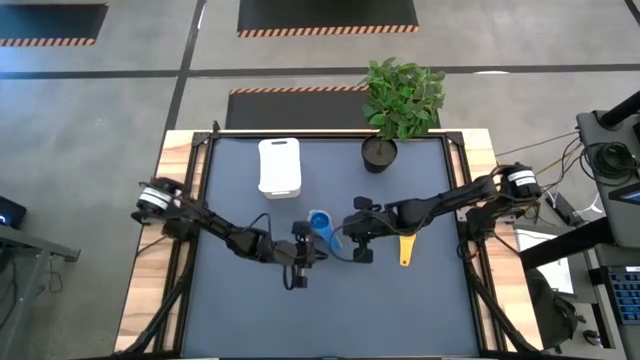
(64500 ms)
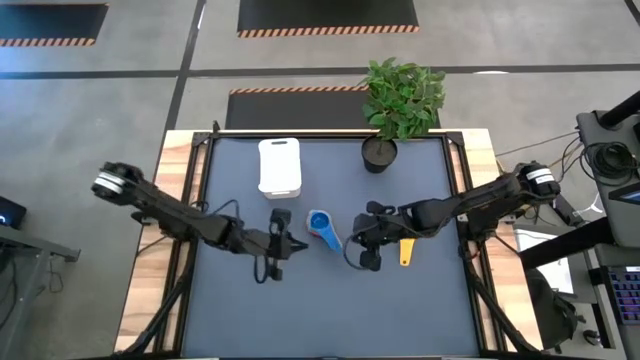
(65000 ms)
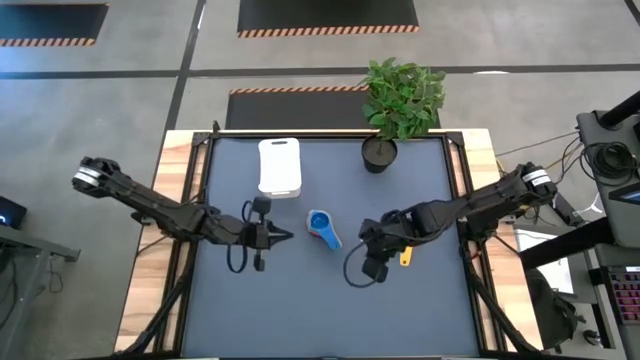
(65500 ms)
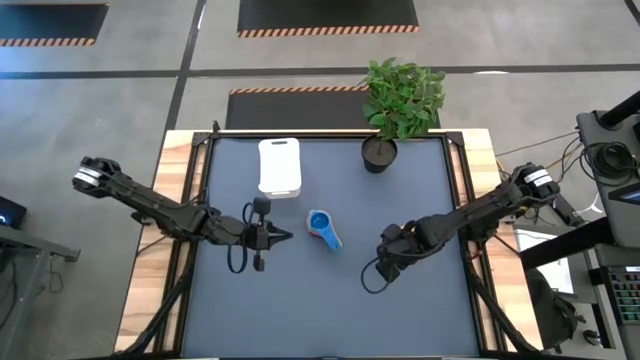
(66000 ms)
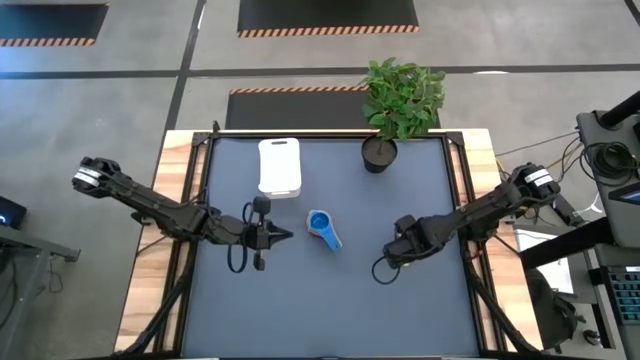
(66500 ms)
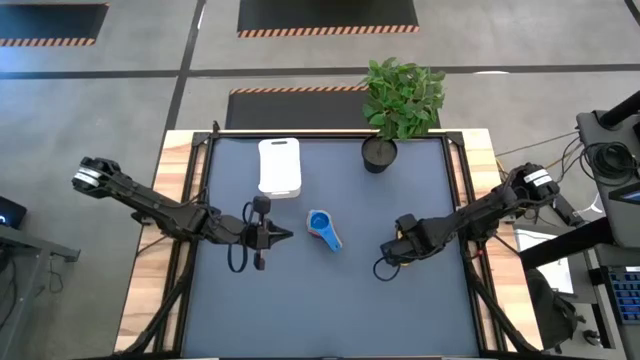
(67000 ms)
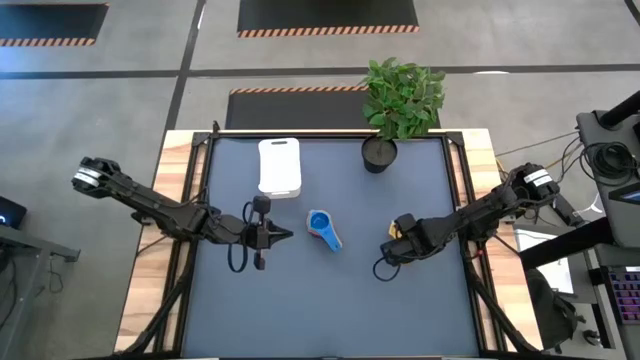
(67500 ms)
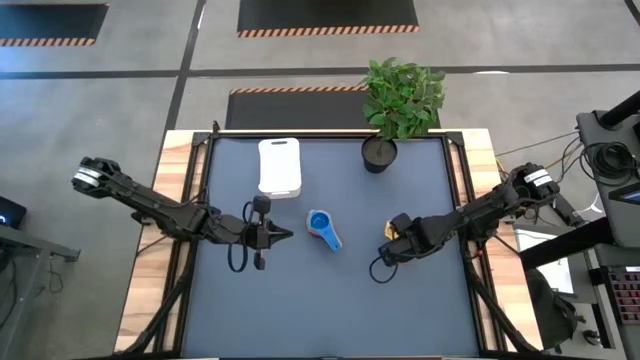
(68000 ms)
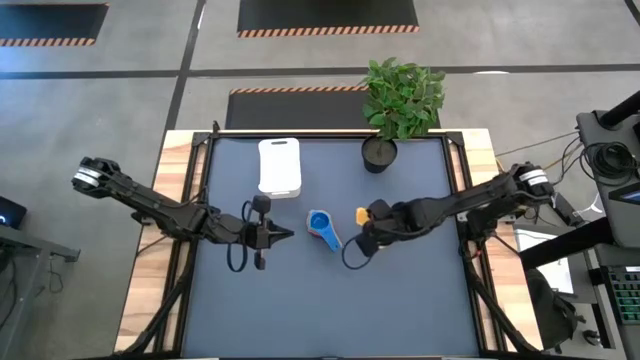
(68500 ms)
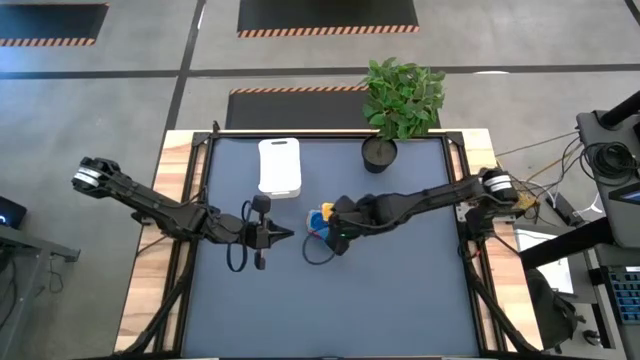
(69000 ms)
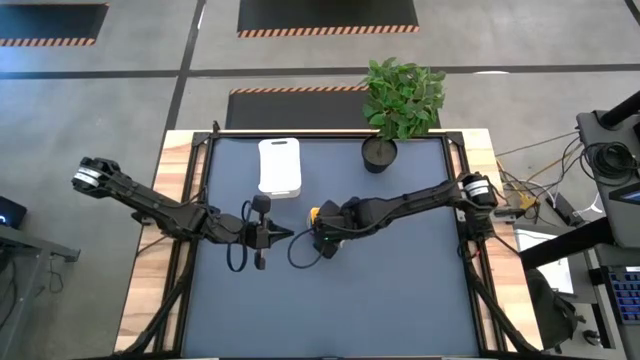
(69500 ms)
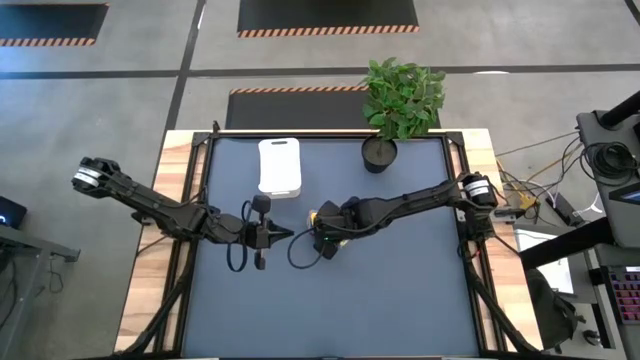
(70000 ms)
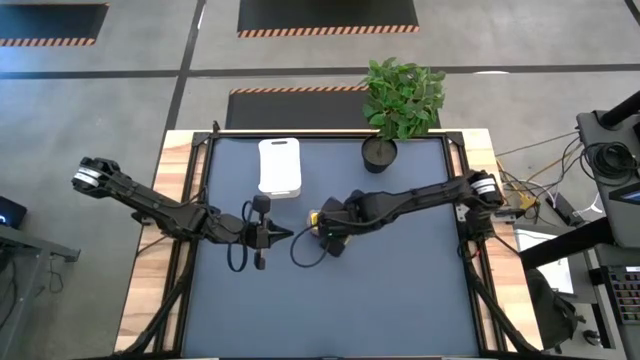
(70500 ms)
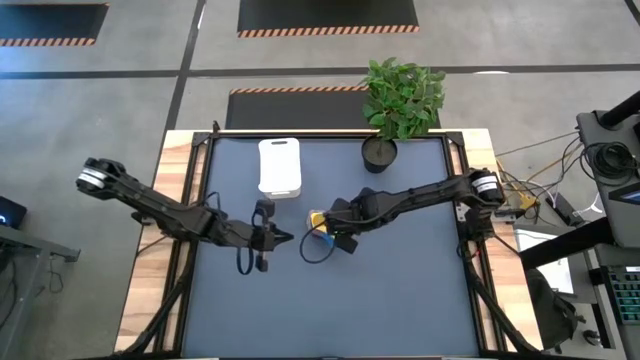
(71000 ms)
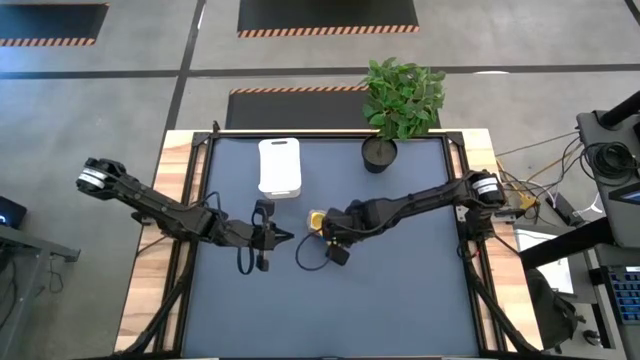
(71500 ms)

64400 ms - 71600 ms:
Task: Nest measuring cups in basket
Stack the yellow measuring cup on the top of the blue measuring cup

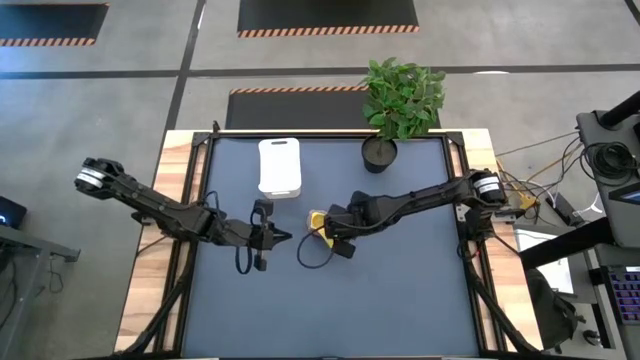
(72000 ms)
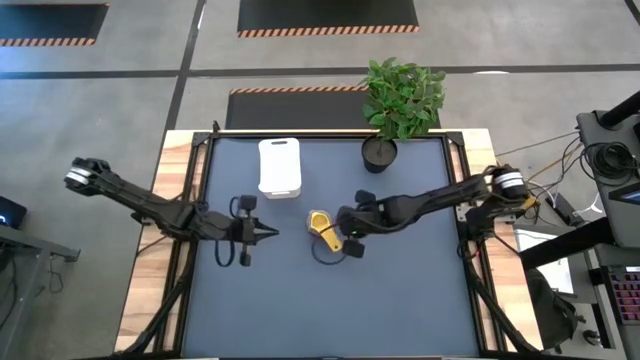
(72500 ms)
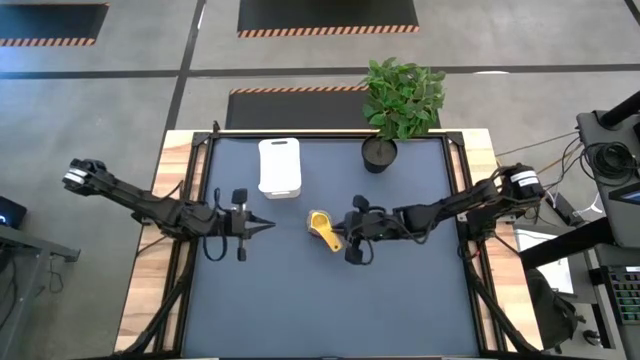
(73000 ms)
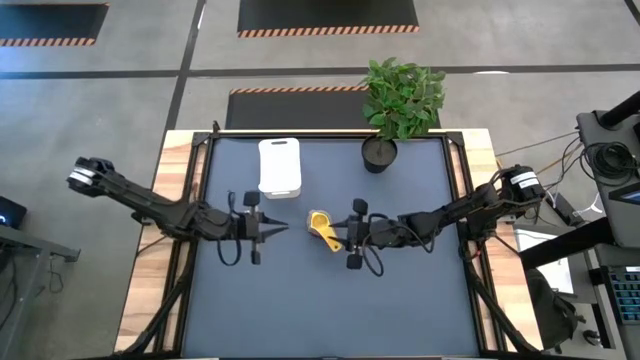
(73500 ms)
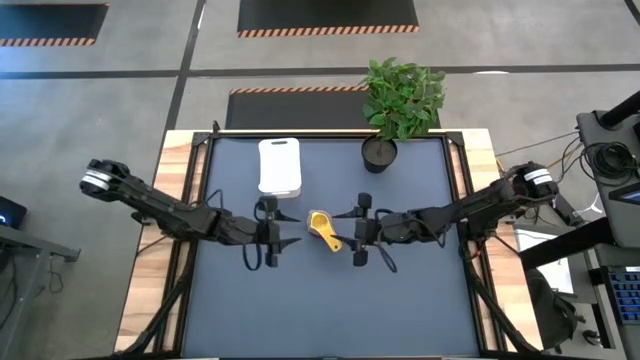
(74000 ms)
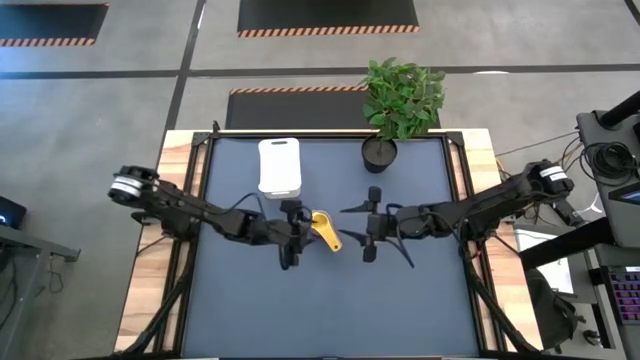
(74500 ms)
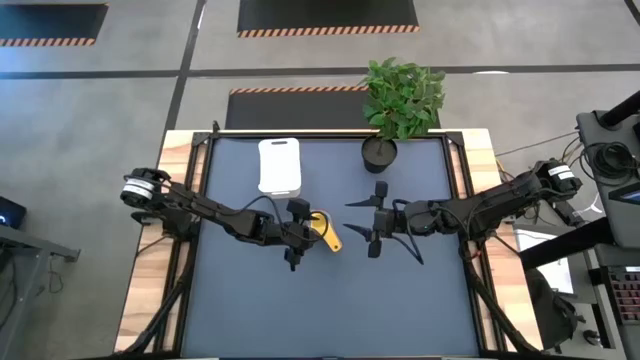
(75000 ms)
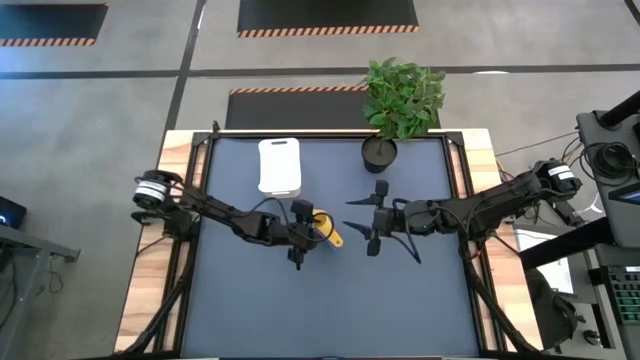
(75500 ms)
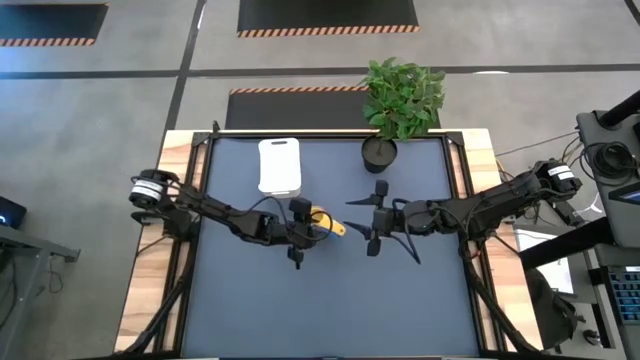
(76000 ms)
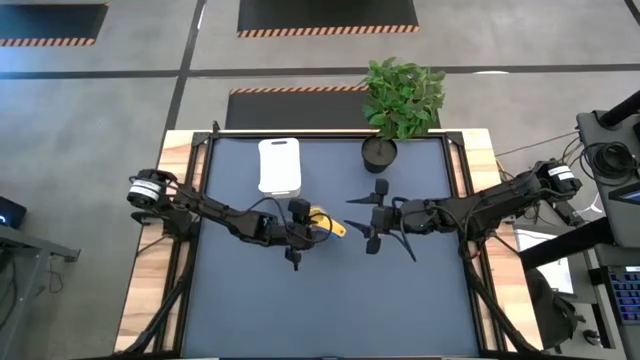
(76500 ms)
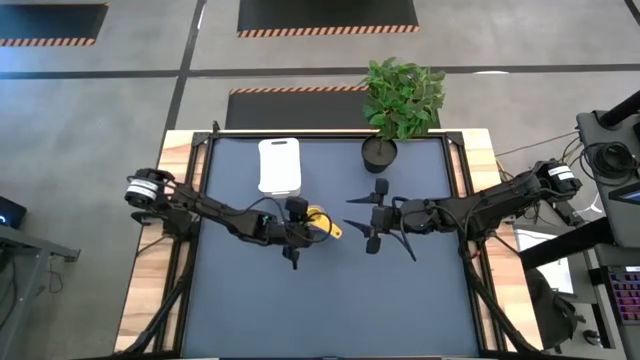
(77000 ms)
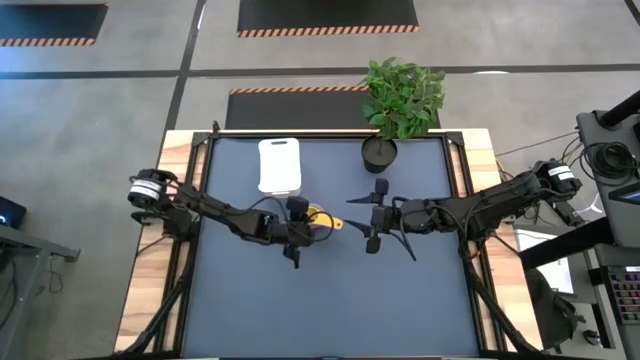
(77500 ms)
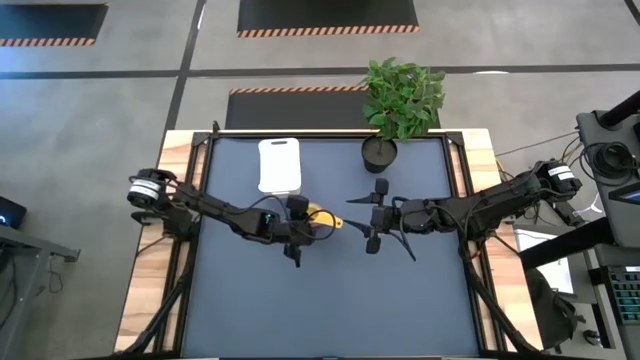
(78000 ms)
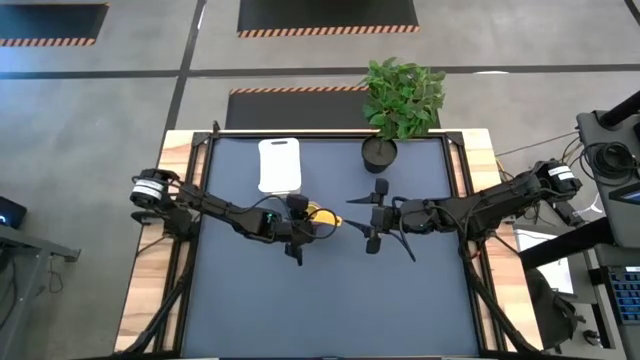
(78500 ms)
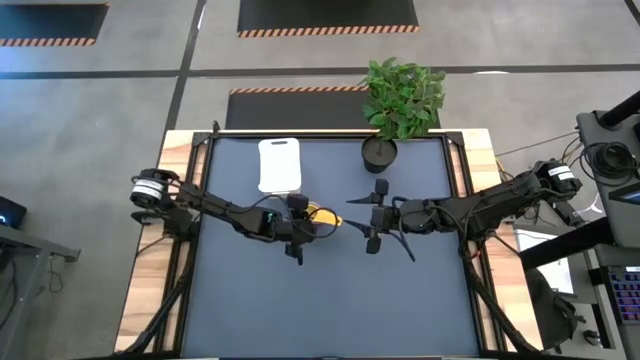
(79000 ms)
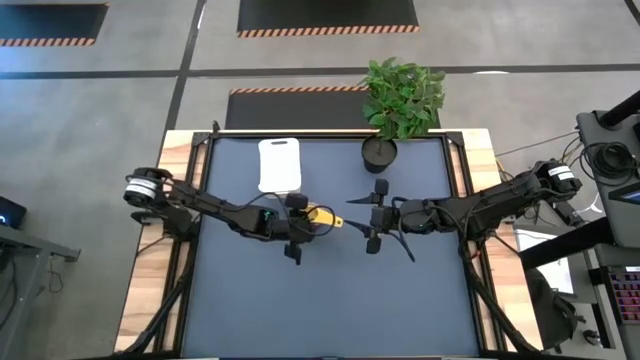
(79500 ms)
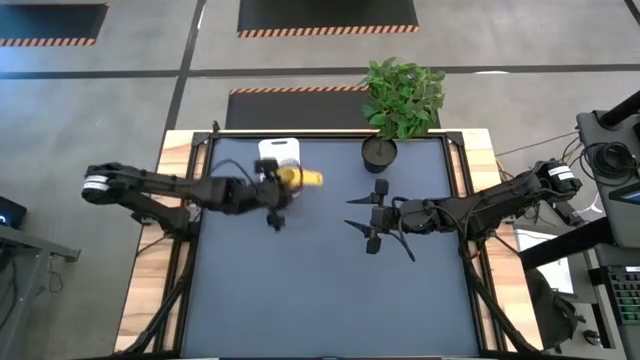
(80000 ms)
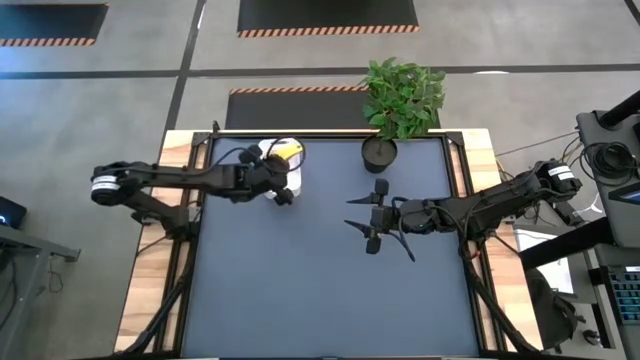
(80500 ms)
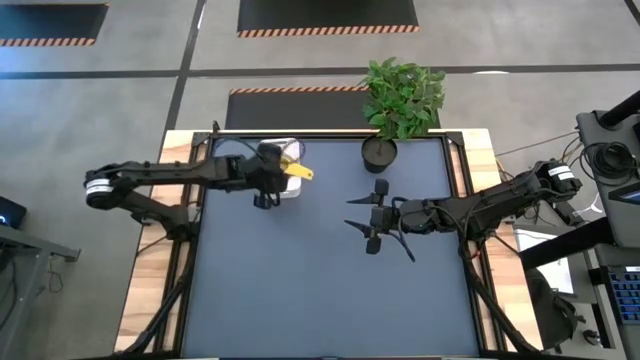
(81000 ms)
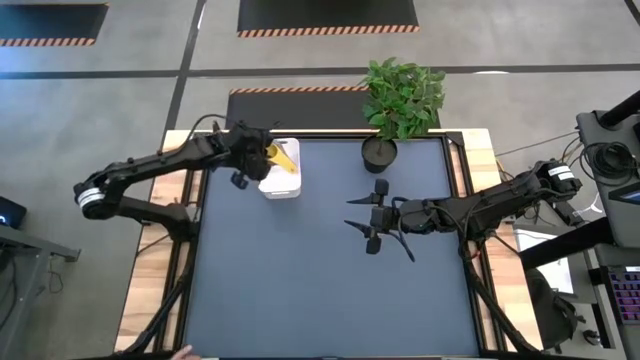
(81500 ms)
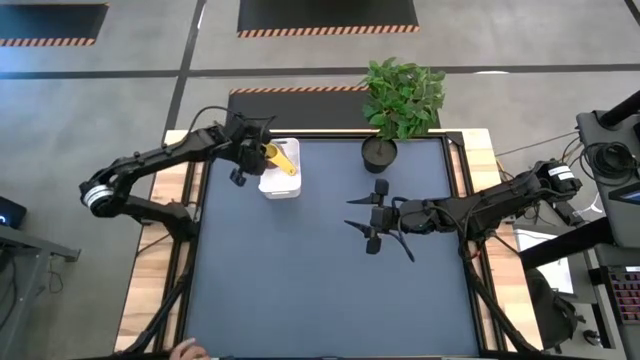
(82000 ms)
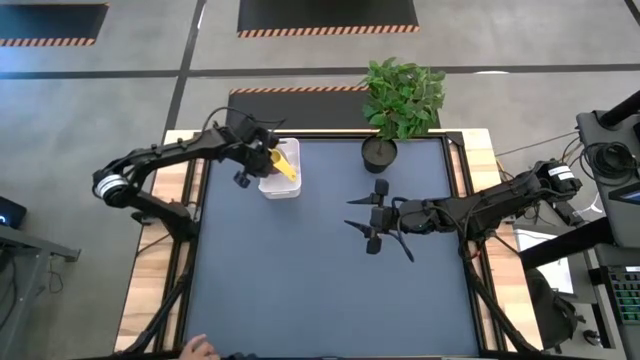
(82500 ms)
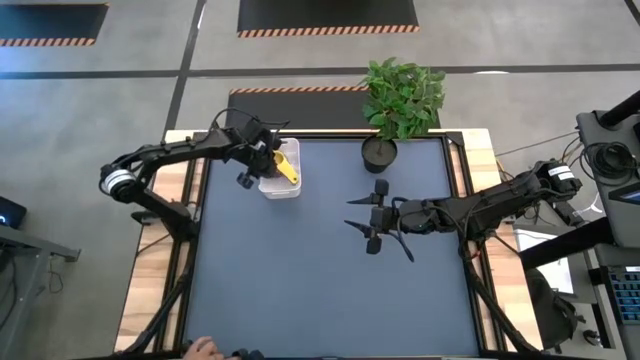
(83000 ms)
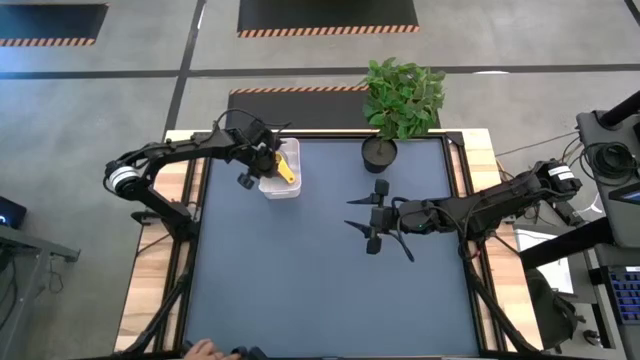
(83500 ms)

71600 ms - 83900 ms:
Put the nested measuring cups into the white bin

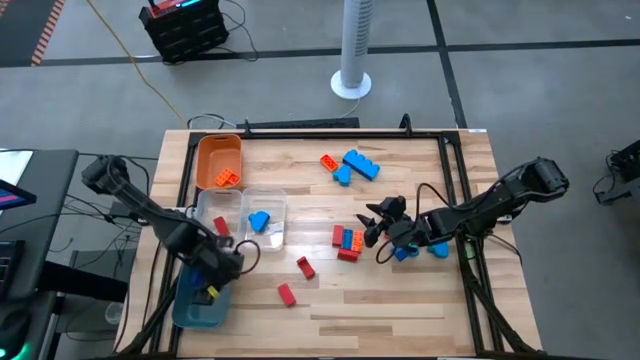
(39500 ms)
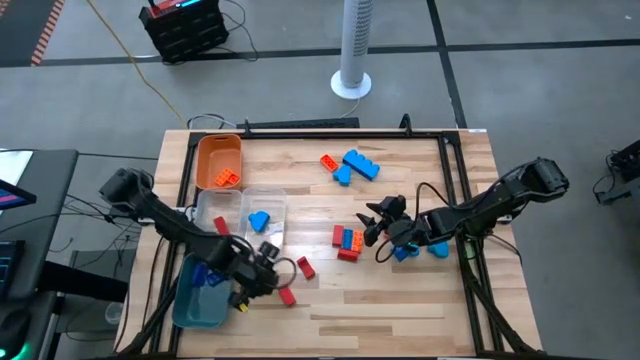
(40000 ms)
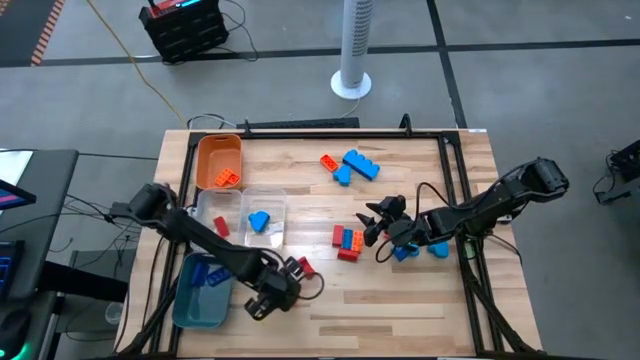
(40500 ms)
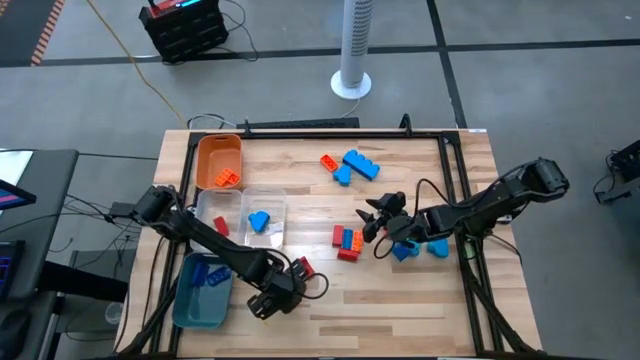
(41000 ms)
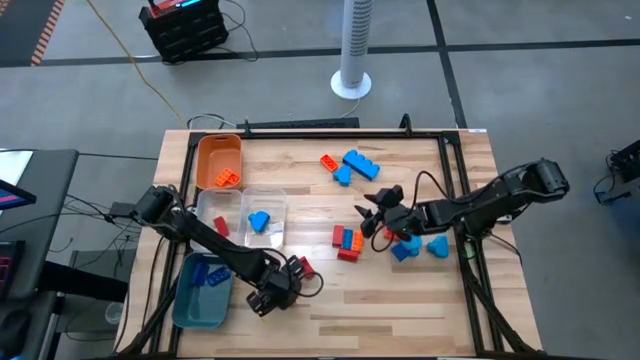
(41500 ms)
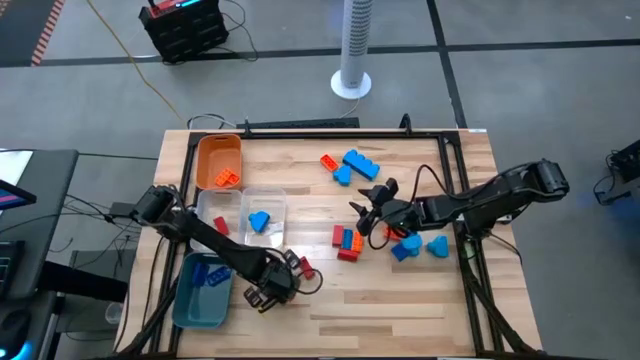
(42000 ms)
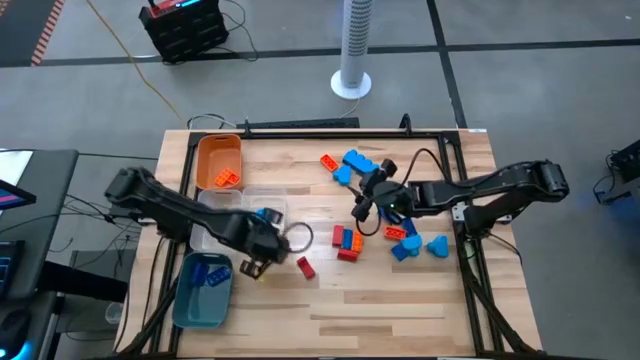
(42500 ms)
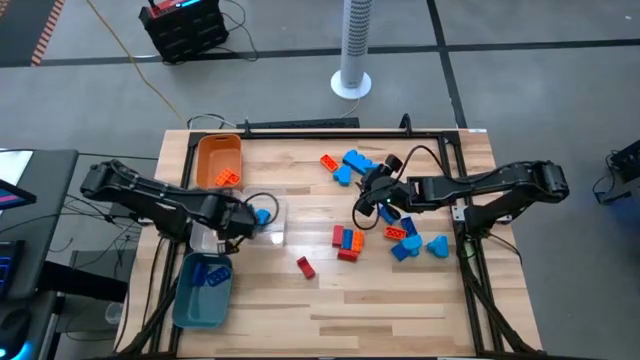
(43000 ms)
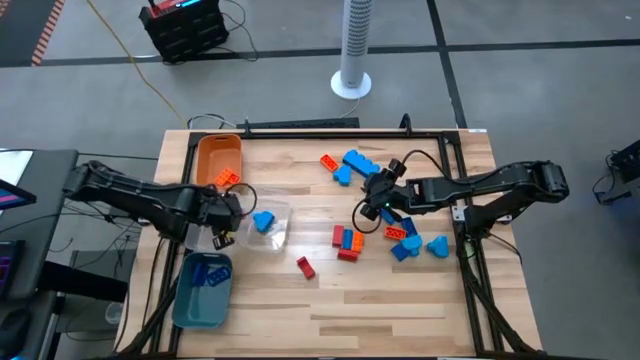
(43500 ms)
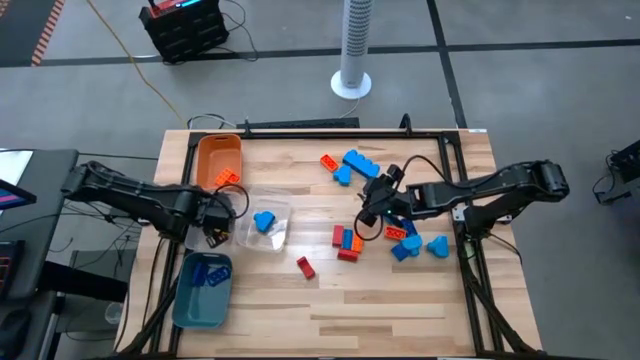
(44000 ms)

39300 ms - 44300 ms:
Task: Sort blocks
Put the red block into the left transparent bin
